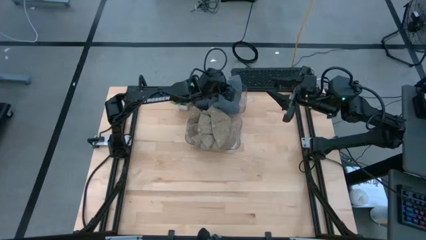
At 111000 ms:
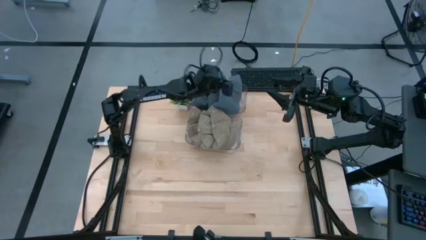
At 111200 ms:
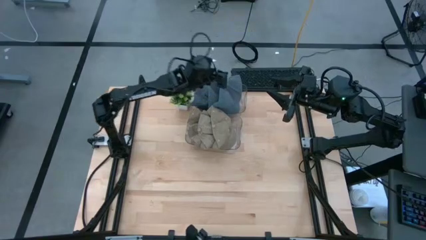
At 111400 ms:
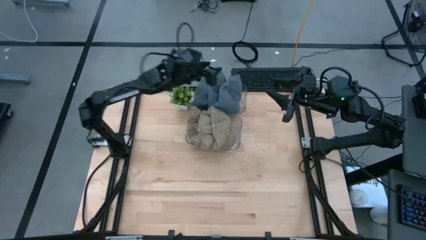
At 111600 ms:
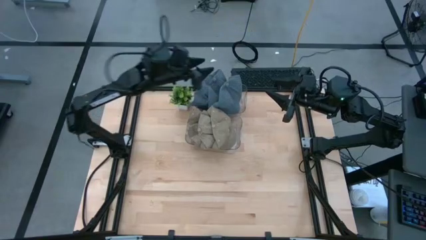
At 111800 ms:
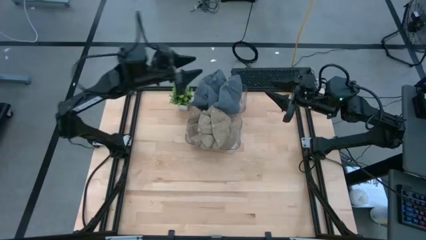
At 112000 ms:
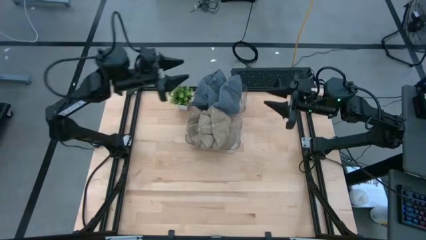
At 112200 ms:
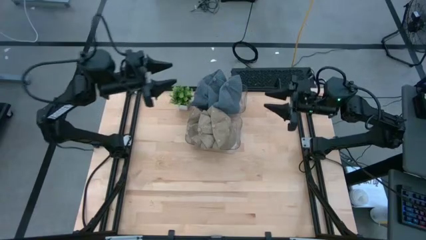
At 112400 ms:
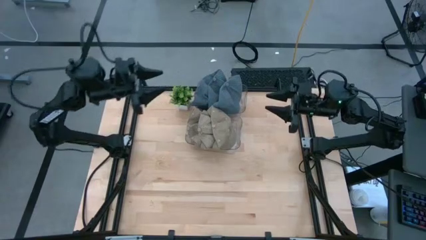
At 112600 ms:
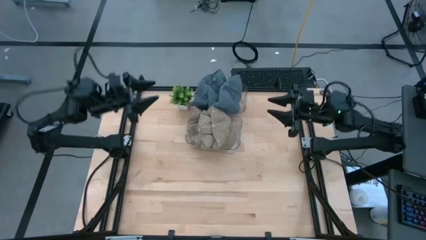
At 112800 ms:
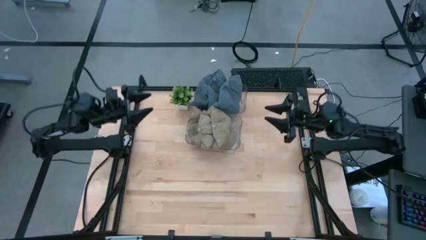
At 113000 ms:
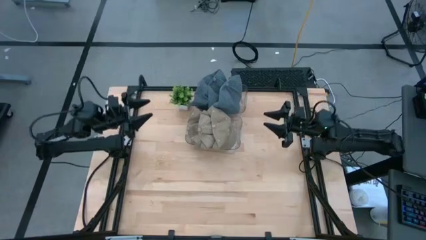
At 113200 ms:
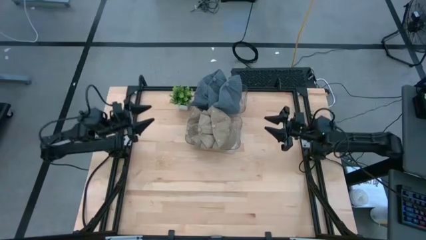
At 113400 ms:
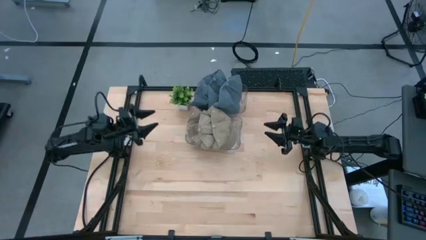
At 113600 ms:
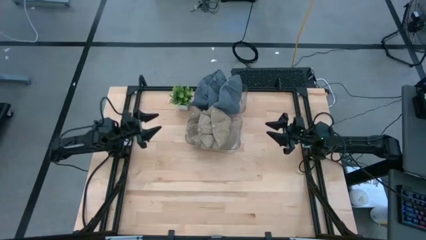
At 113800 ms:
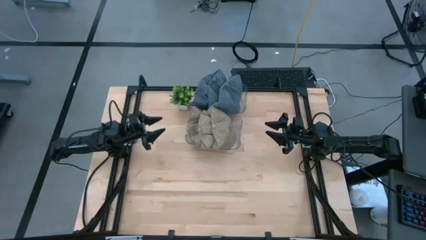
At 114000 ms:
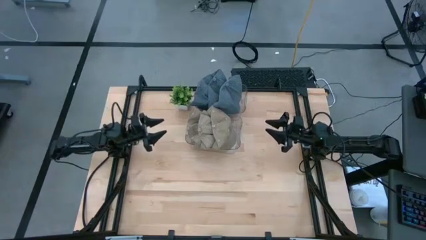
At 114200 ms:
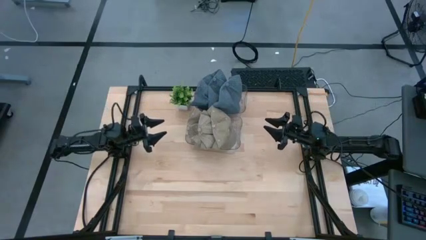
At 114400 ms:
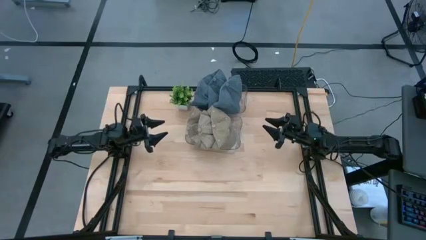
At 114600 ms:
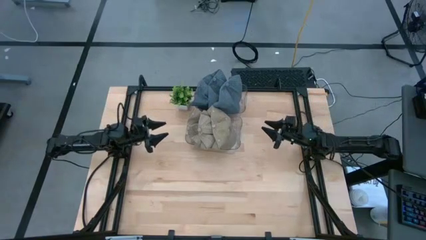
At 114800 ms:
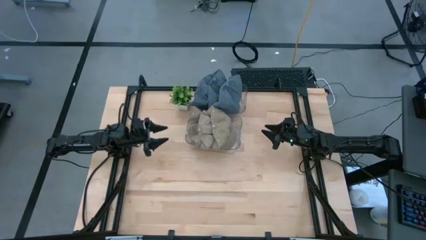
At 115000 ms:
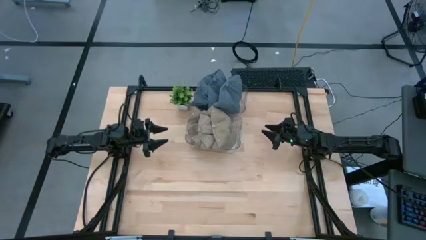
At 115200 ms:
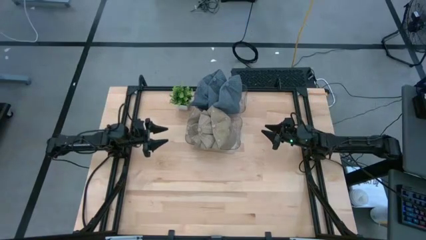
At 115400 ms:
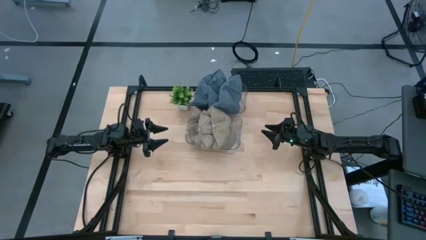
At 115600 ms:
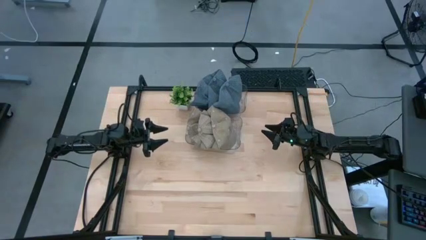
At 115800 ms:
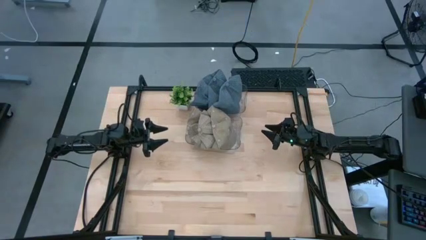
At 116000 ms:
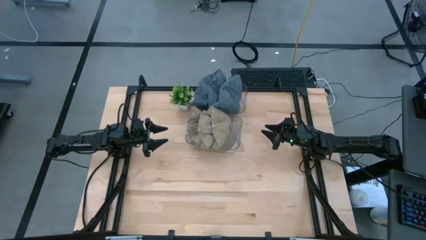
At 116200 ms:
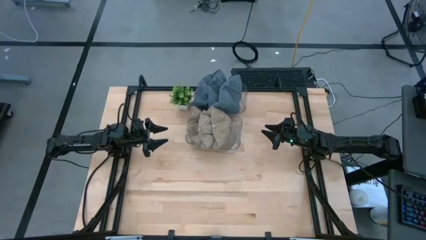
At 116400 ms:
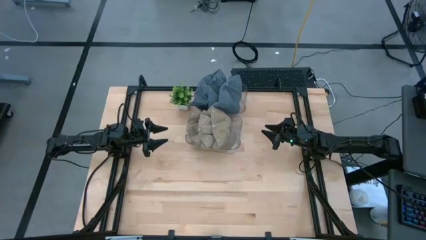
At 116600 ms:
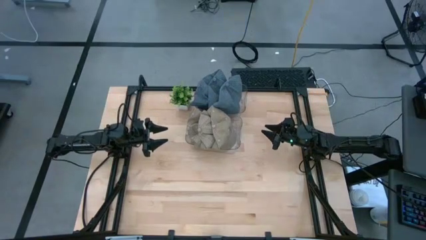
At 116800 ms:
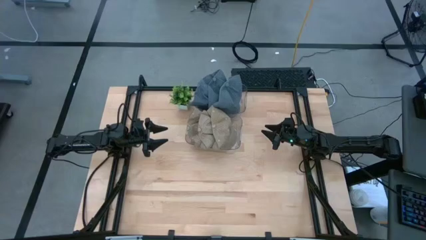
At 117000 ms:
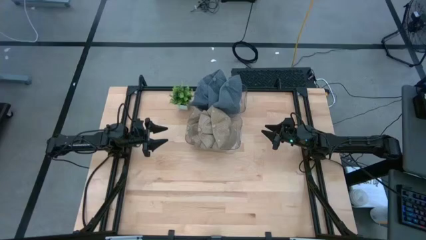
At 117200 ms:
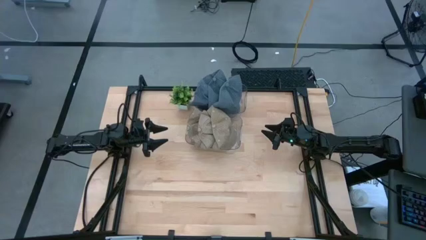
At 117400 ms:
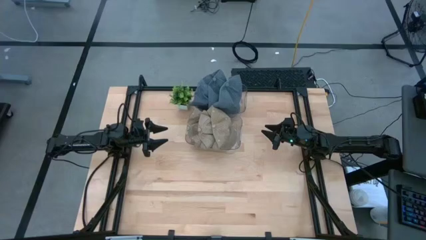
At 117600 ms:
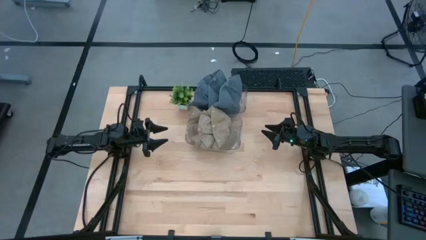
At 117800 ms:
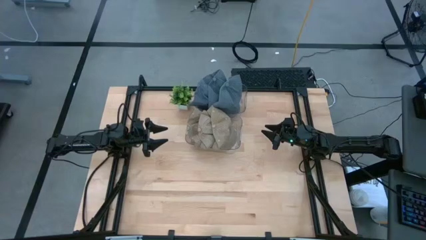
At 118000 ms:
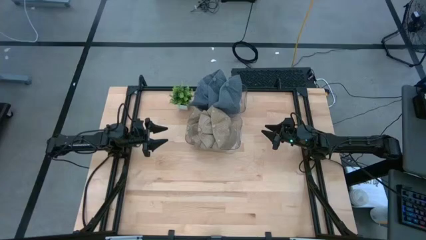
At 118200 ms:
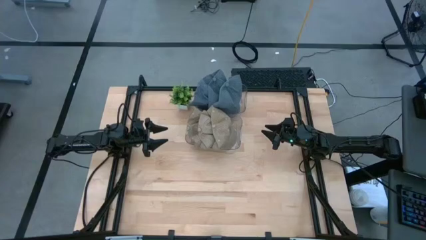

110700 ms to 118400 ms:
Task: Pick & Place hat
Return to Home Position

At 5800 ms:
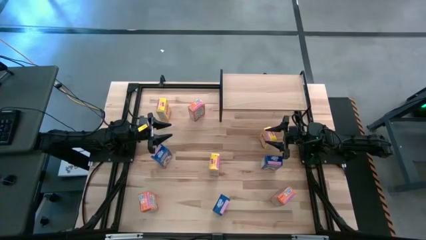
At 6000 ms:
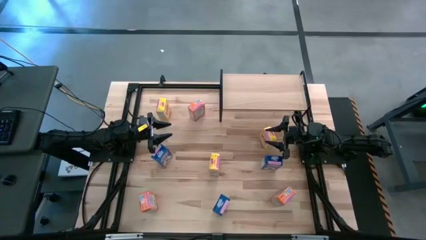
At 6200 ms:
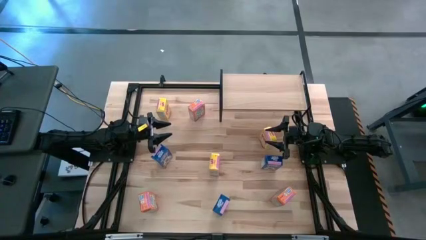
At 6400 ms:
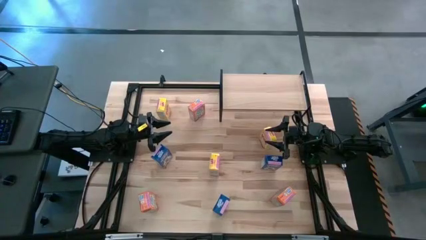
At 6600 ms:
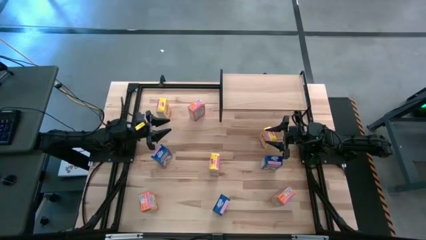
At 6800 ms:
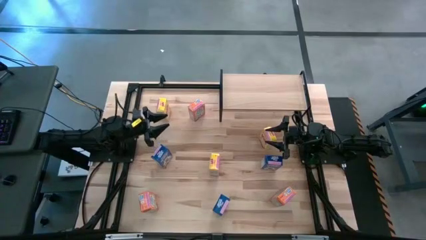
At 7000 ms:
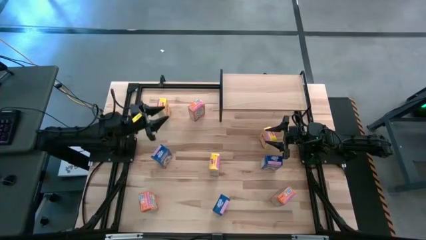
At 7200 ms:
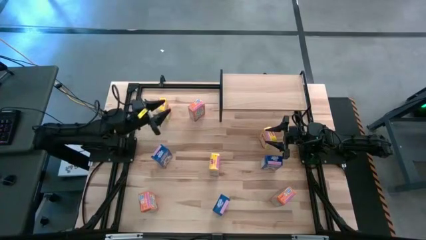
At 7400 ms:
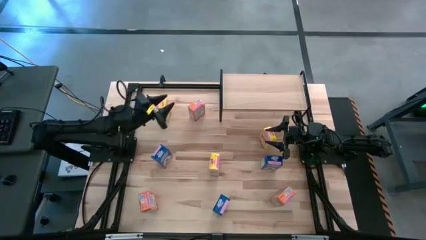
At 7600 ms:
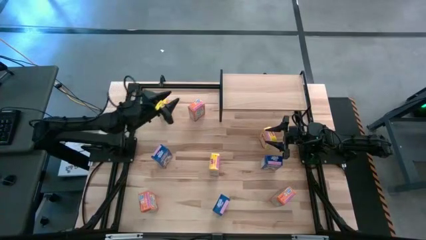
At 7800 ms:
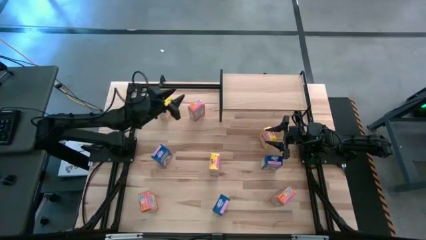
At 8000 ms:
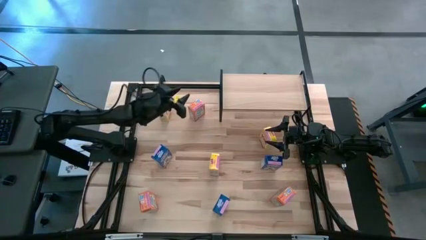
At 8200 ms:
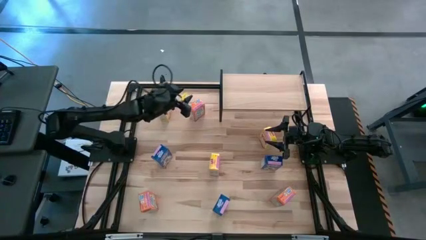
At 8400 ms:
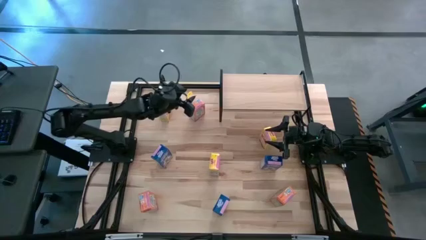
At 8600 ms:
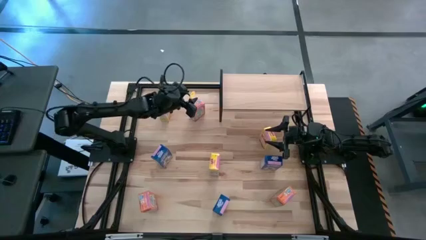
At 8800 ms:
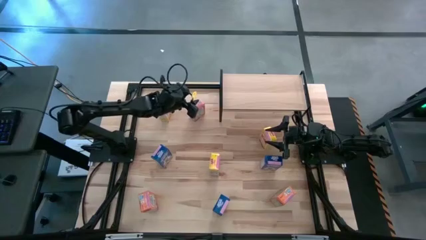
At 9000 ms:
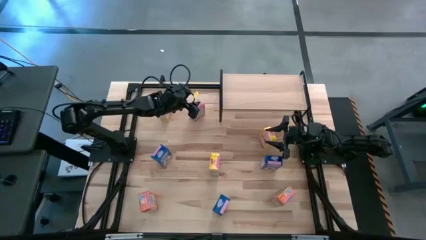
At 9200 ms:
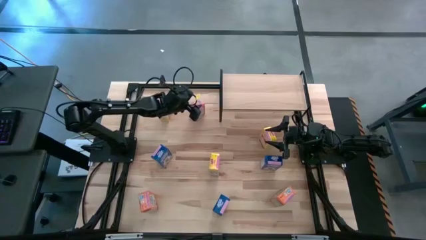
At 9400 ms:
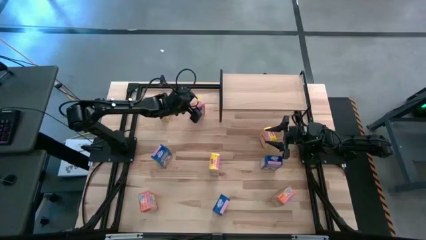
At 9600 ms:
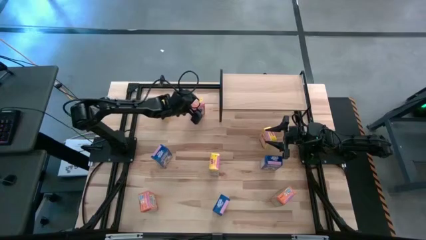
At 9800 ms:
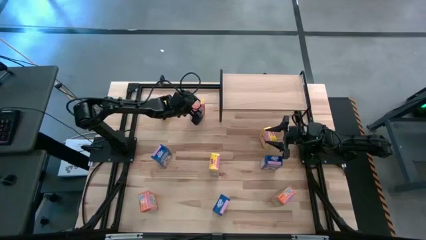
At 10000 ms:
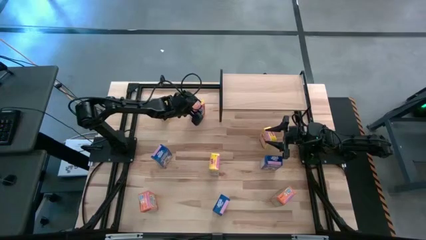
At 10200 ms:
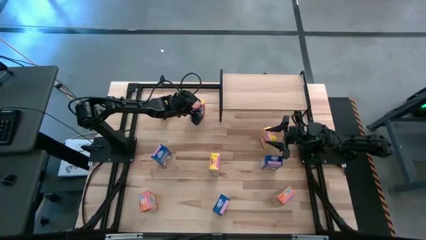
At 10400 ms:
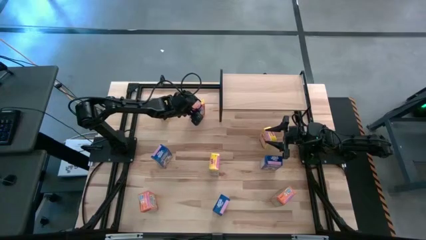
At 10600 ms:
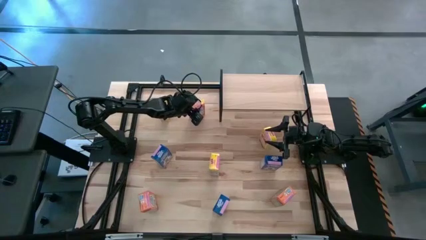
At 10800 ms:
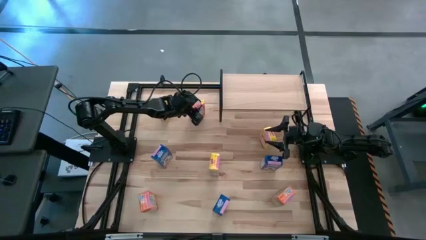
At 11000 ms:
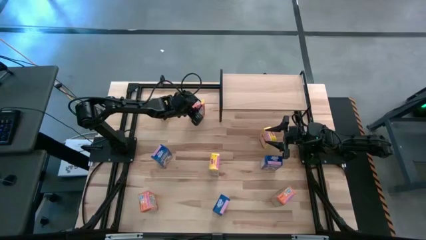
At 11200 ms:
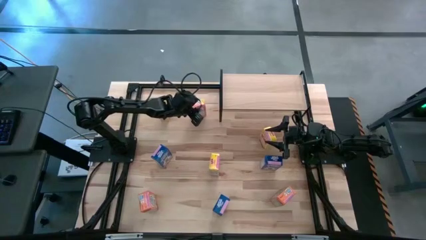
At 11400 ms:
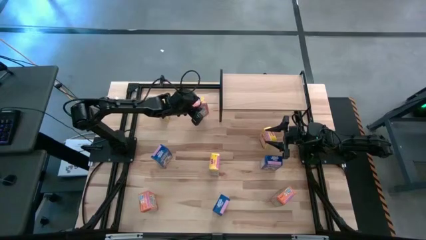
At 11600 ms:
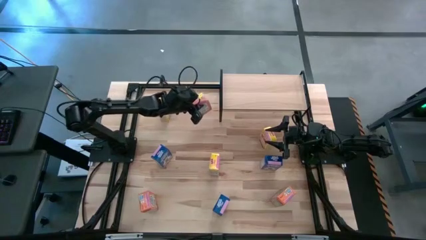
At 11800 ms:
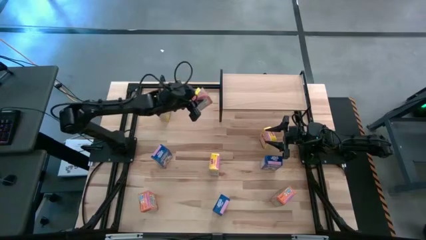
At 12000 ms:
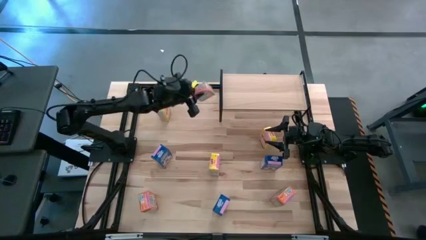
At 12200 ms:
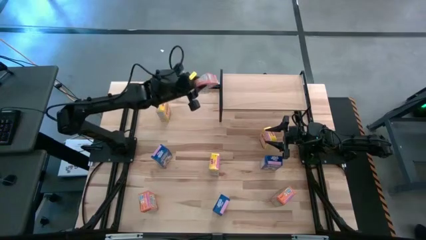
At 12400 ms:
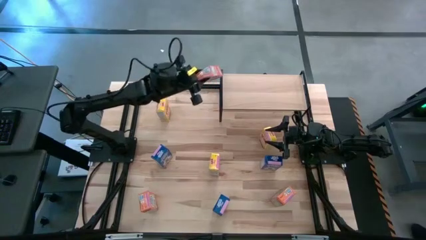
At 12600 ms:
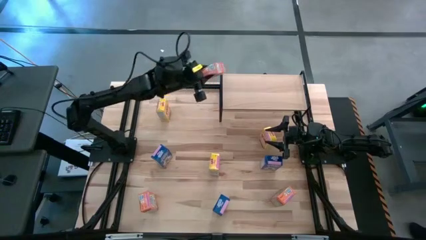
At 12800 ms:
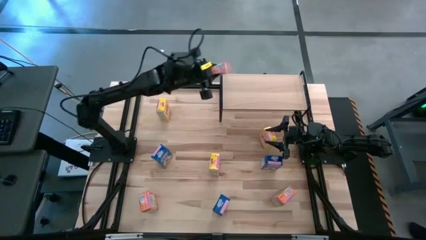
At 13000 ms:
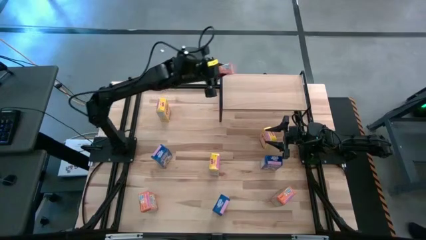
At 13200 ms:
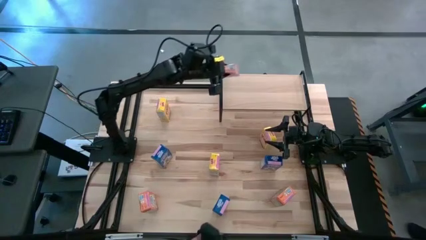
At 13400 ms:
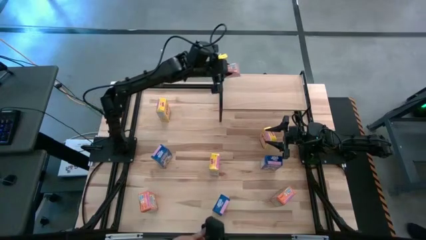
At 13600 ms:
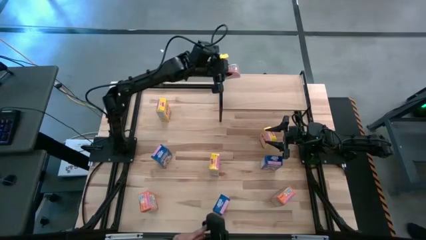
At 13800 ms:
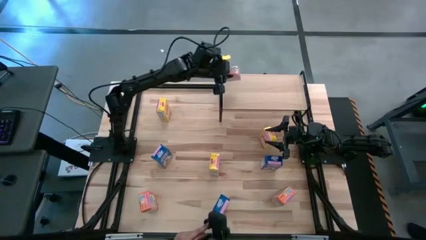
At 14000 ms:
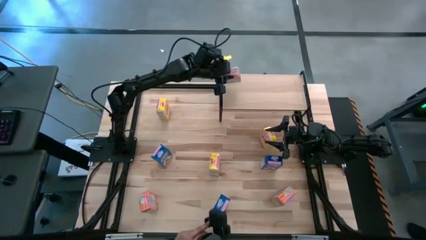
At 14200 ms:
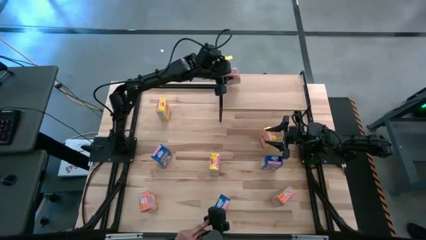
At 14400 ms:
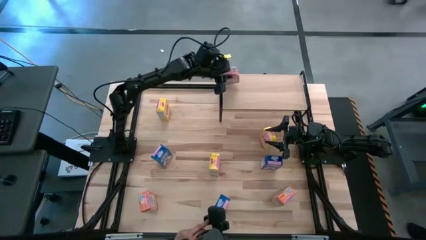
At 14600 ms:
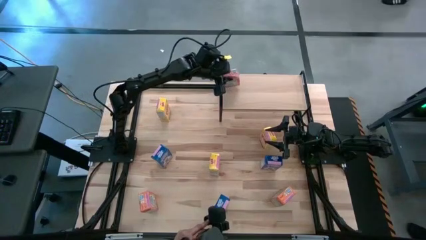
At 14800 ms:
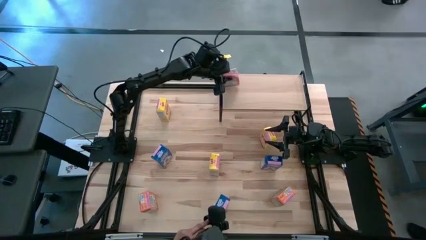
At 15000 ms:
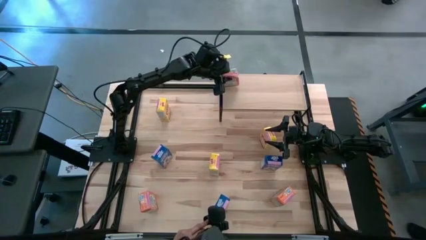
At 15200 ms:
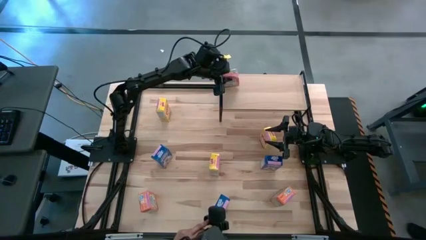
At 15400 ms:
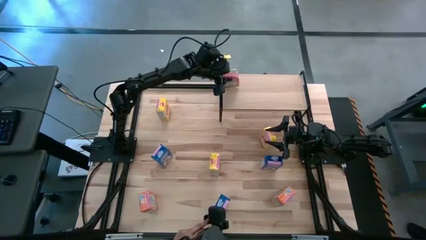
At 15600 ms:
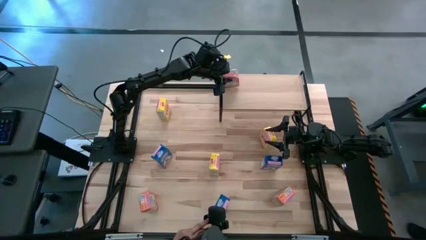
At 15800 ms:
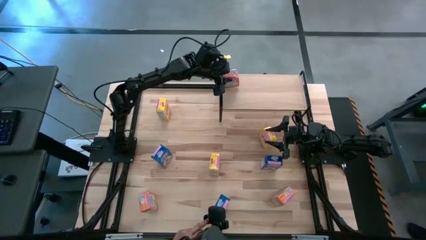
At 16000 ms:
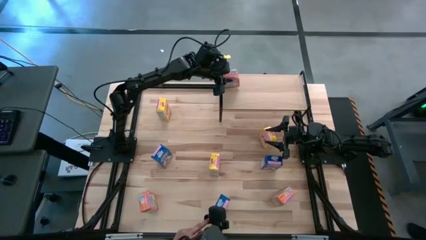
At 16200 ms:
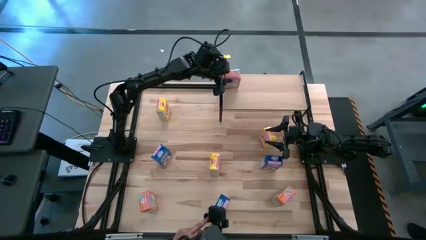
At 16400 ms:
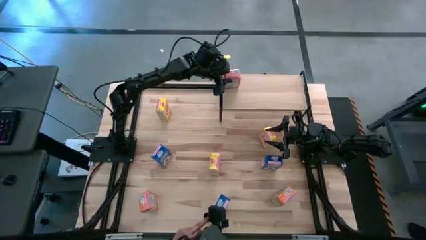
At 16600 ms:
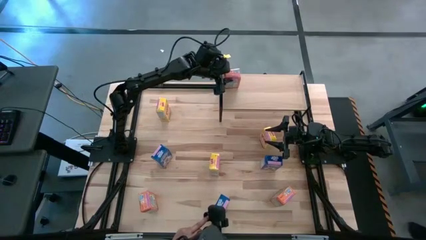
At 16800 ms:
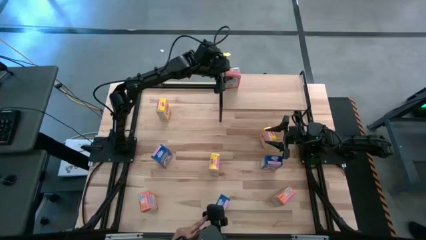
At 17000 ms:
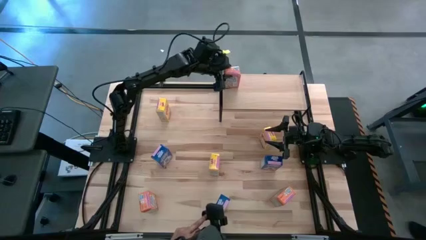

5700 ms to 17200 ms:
Task: Stack cereal on shelf
Put the top orange cereal box on the shelf
